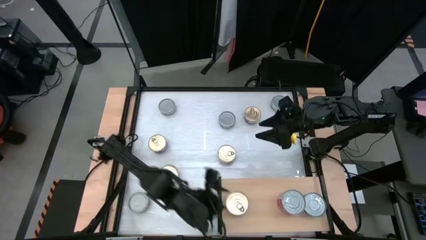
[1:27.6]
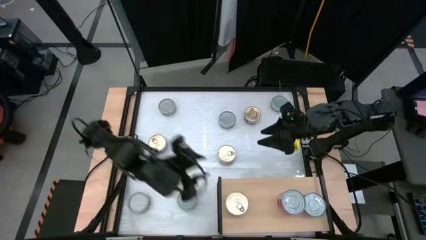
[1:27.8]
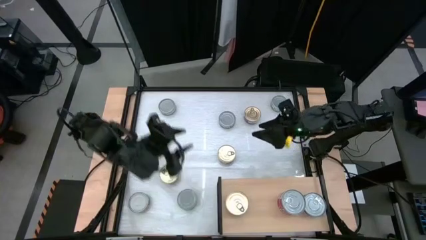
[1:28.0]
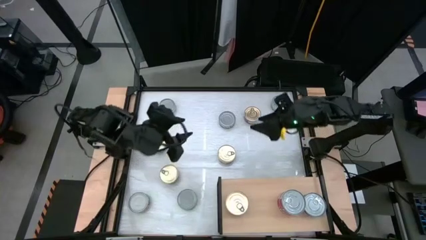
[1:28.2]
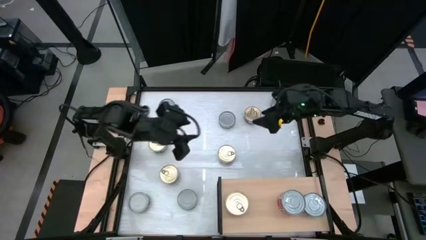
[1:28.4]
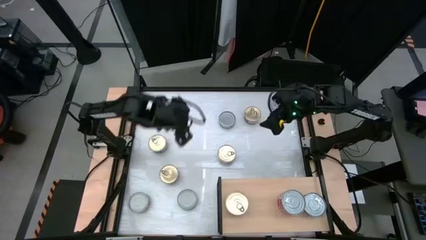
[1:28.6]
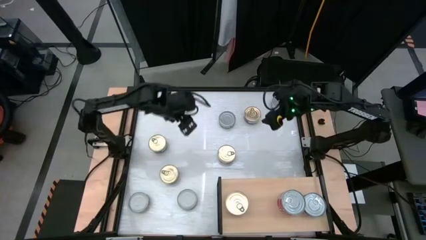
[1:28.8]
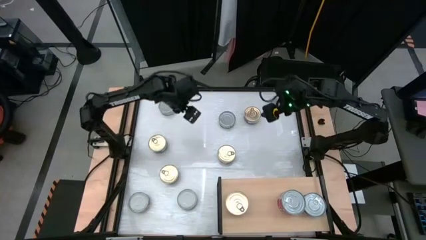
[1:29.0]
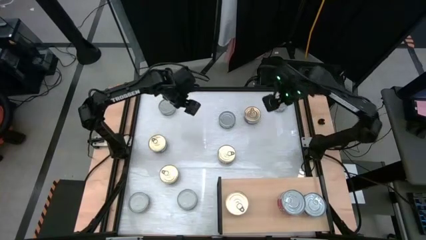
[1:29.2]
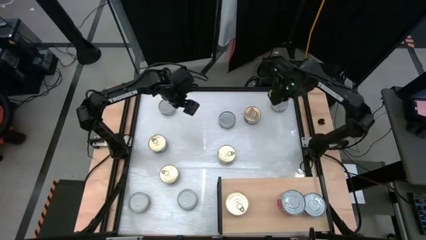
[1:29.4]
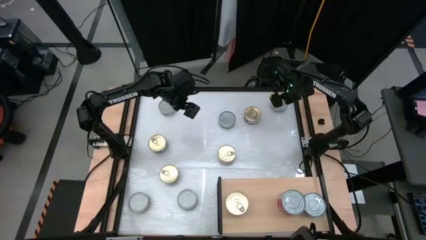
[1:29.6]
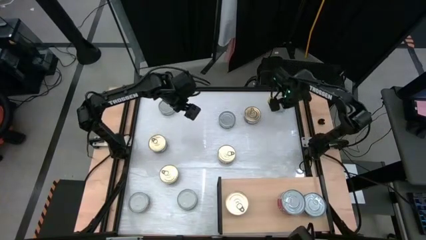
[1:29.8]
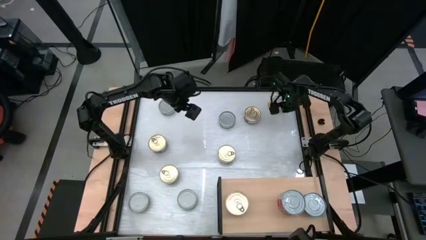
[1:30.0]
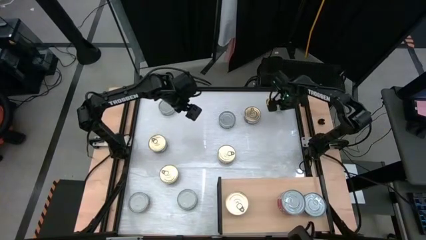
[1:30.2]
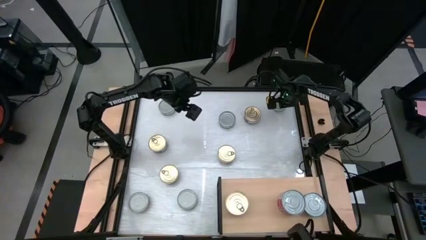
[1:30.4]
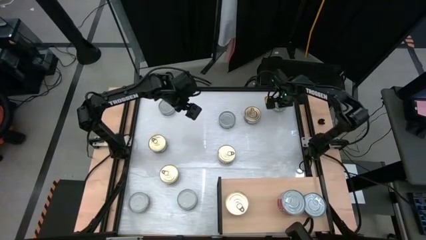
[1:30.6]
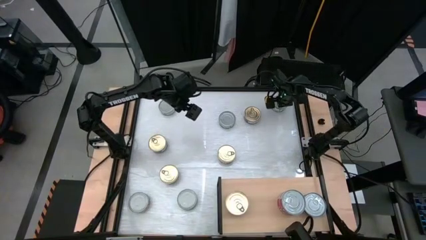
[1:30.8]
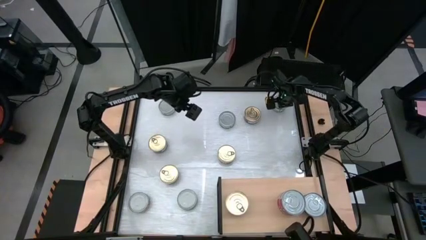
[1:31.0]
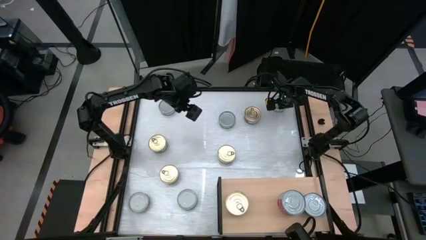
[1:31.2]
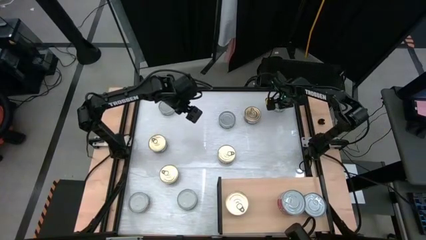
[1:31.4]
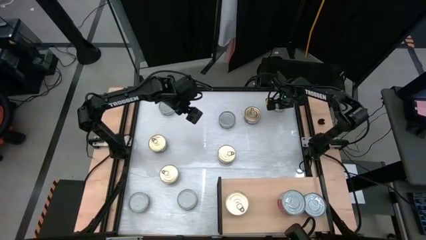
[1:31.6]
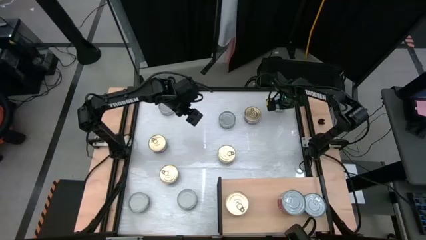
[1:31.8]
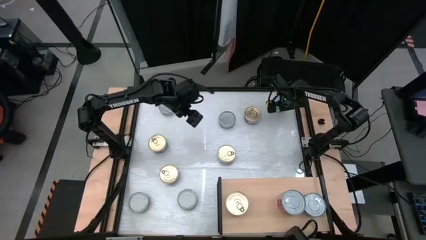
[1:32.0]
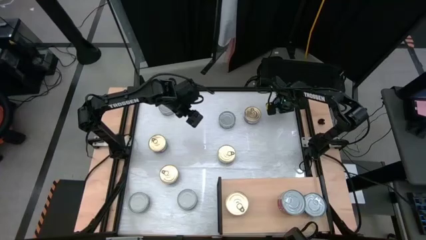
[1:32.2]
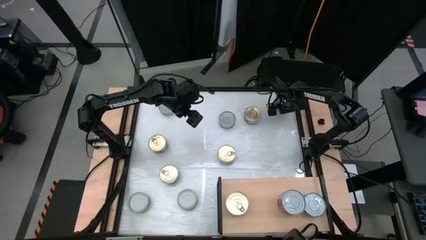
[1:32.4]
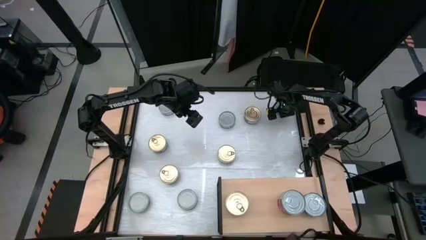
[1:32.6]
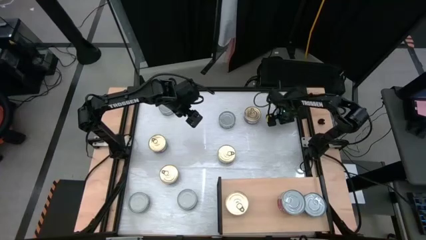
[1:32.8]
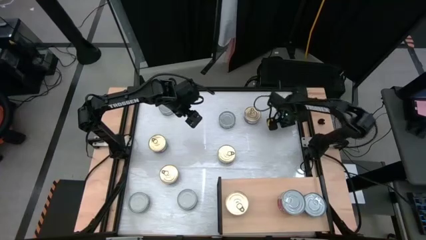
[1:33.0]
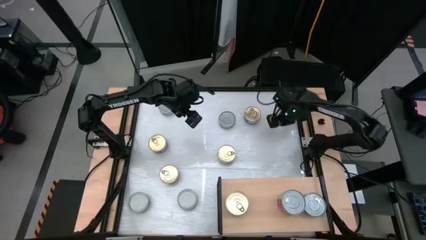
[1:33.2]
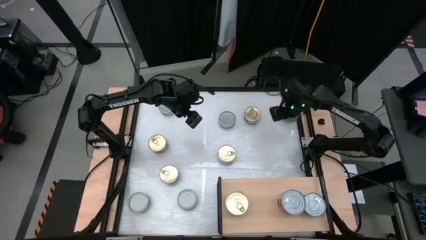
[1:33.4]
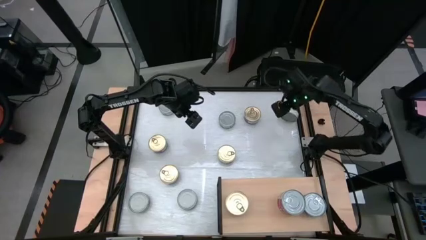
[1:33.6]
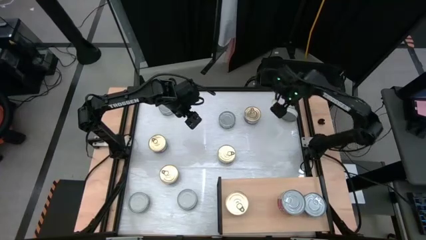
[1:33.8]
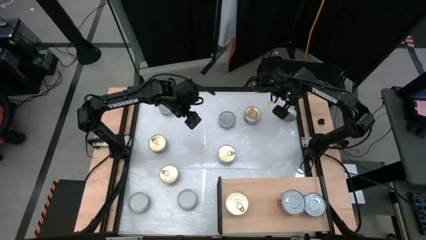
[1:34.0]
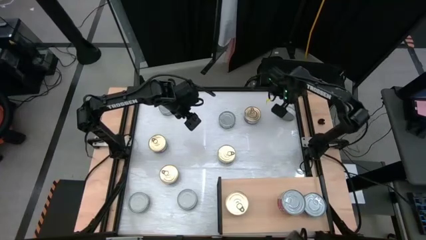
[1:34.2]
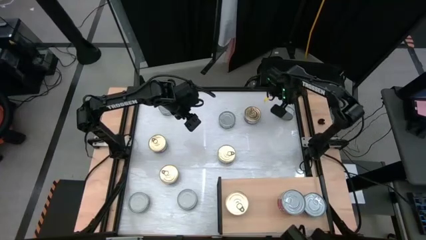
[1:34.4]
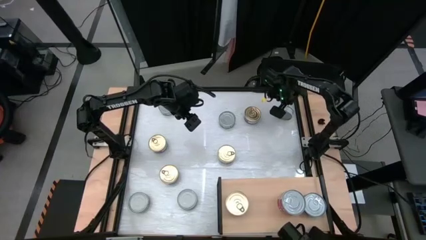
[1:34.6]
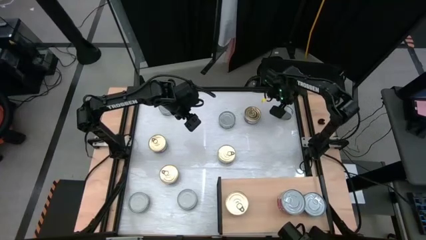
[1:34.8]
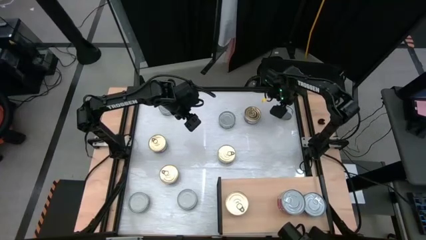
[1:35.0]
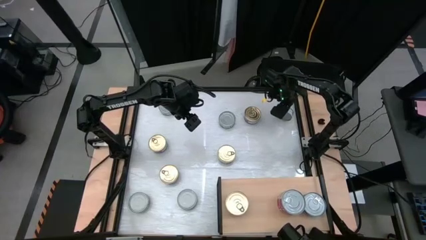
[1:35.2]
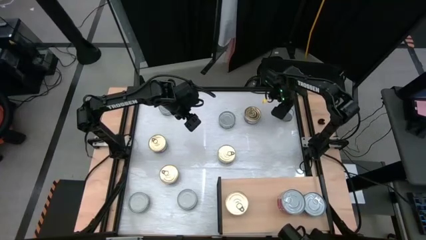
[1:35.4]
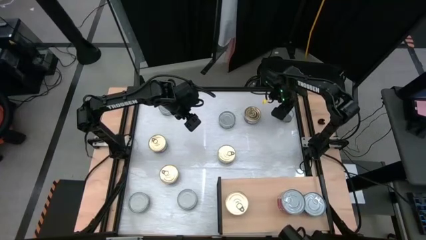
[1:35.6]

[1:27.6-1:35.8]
Task: Stack canned seafood by type on shelf
Put the green tuna can on the shelf

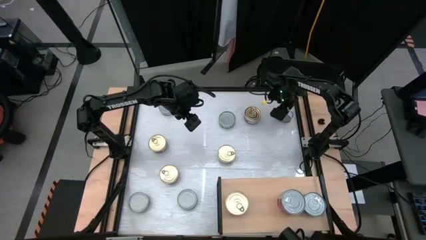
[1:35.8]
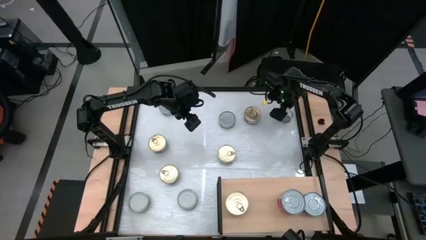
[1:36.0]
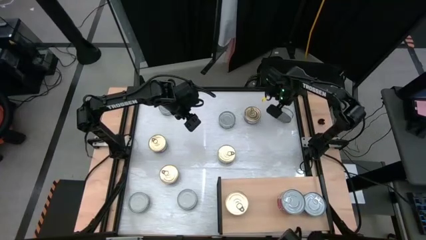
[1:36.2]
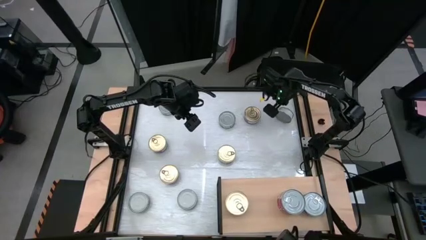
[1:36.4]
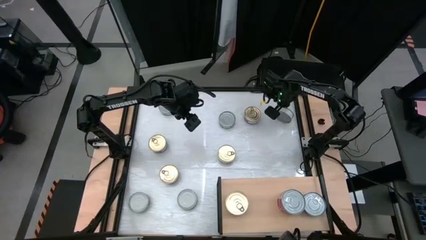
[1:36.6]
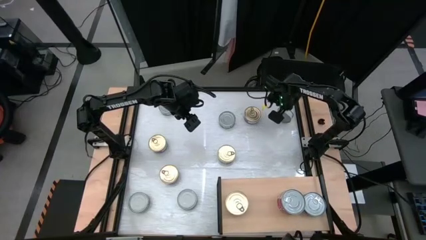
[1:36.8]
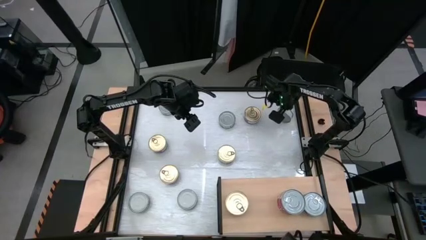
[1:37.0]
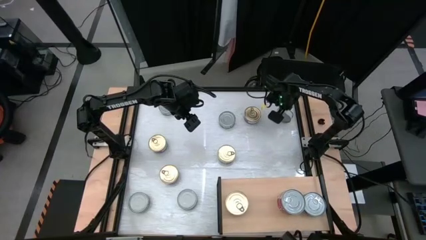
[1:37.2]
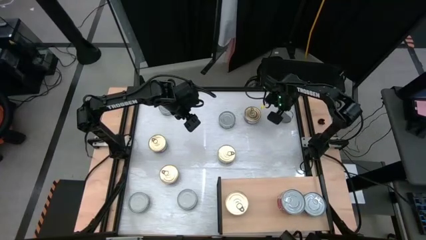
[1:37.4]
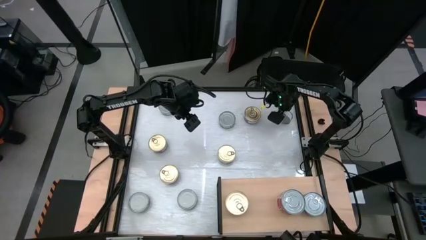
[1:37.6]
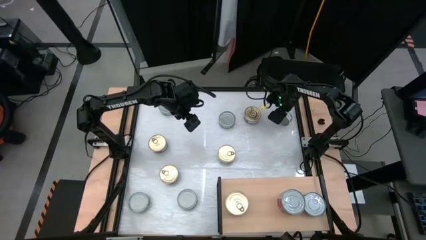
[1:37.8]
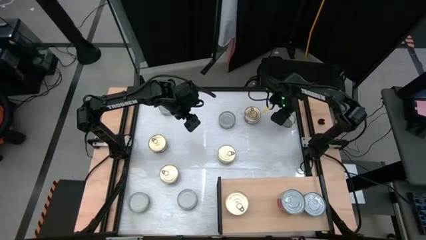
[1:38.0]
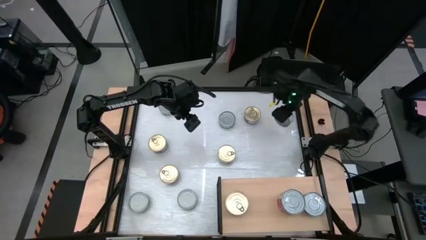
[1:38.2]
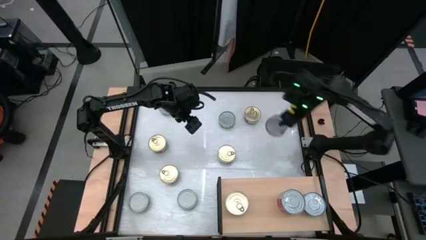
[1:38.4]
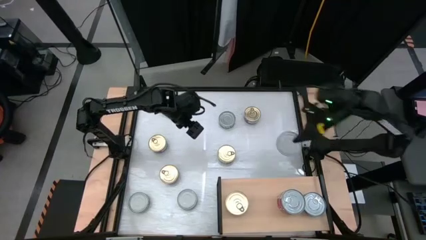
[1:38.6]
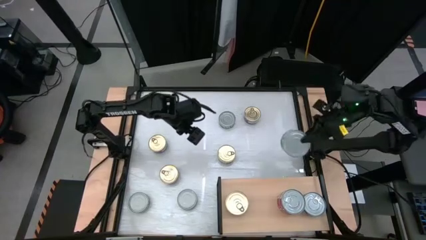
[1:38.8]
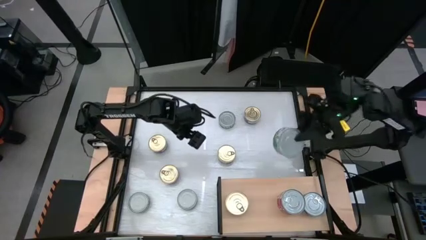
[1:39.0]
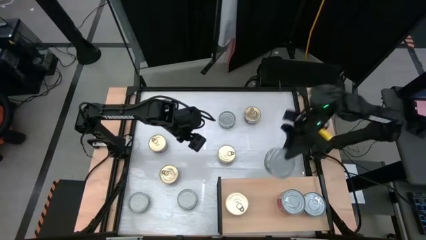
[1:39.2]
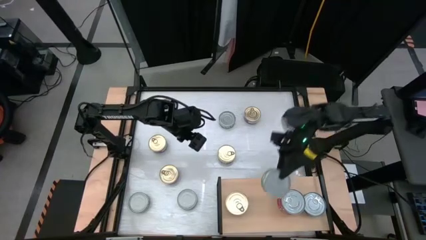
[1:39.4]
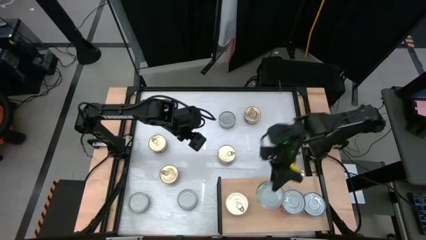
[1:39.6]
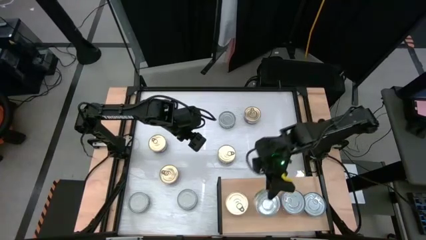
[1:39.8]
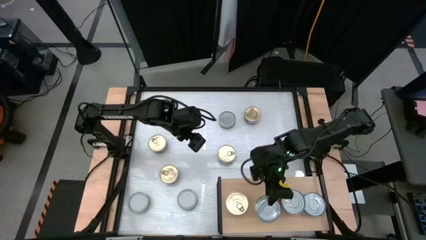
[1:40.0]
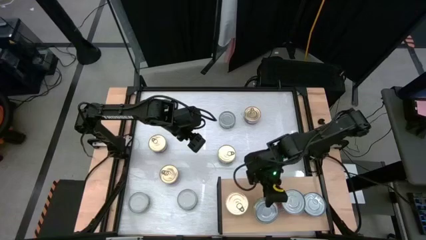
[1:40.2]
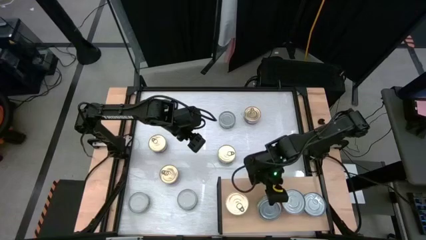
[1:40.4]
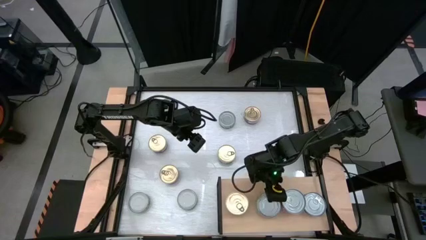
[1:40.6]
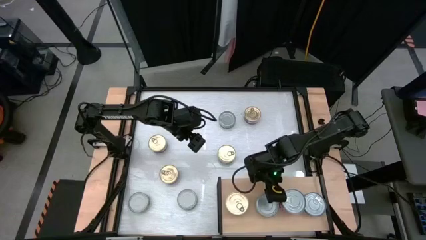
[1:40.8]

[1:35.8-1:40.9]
Put the green tuna can on the shelf

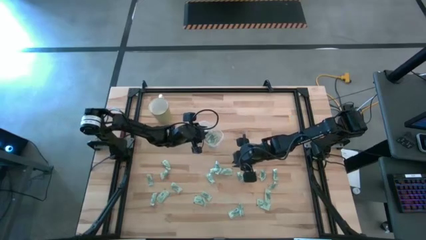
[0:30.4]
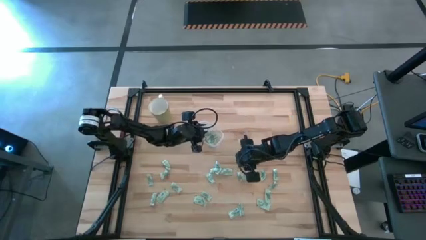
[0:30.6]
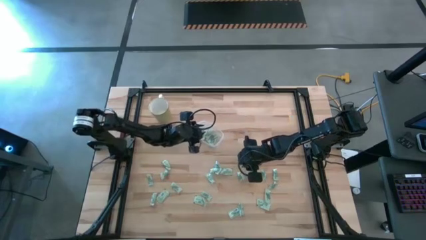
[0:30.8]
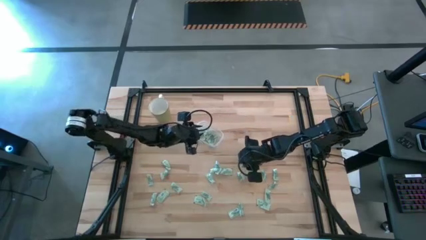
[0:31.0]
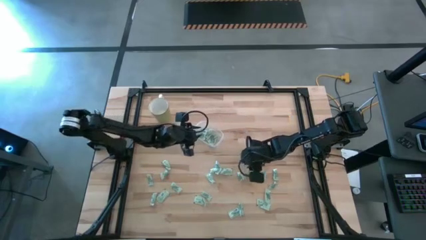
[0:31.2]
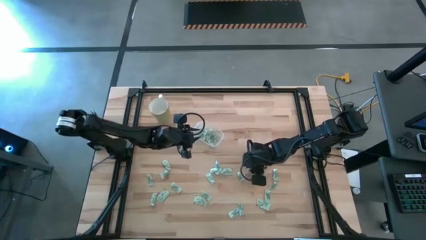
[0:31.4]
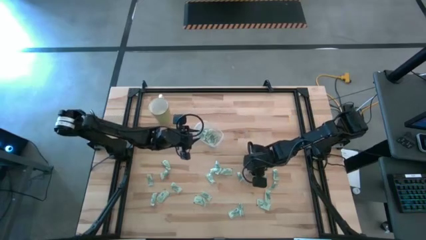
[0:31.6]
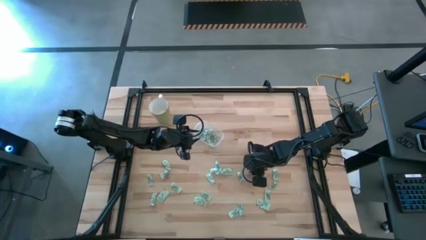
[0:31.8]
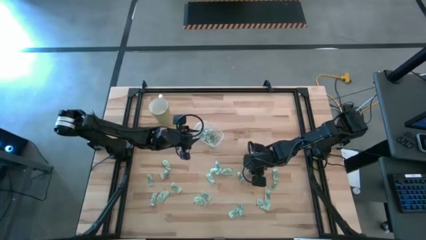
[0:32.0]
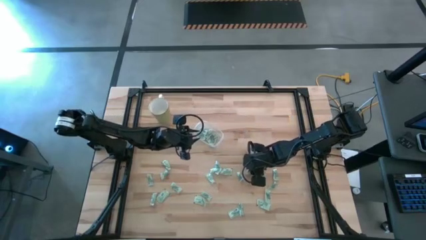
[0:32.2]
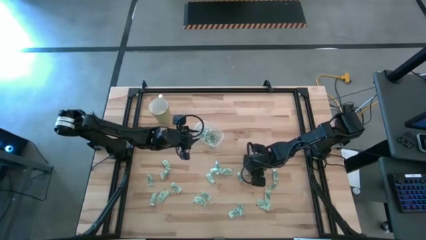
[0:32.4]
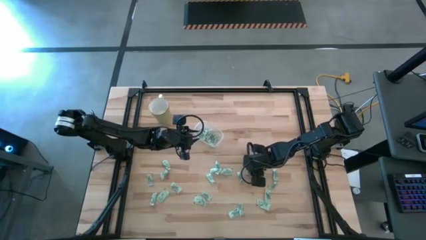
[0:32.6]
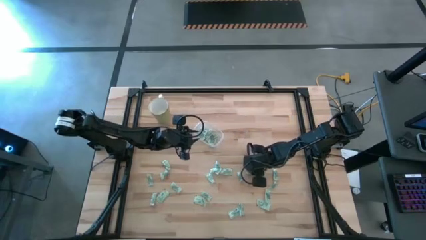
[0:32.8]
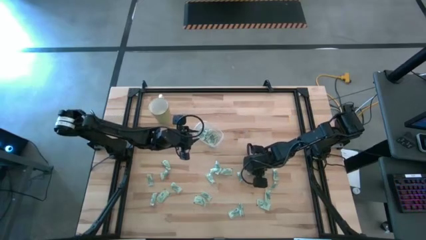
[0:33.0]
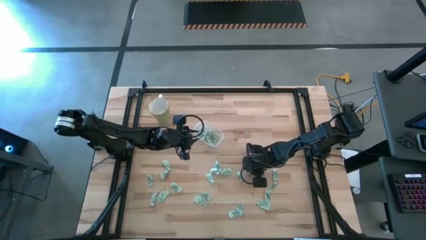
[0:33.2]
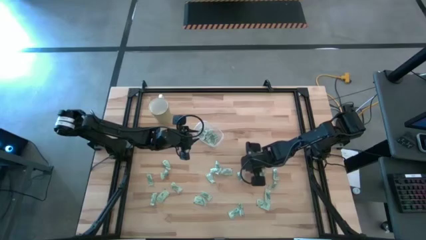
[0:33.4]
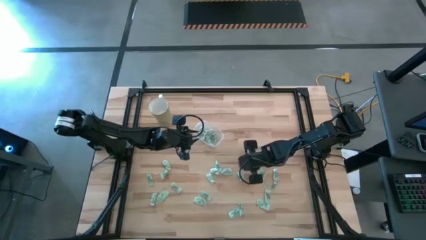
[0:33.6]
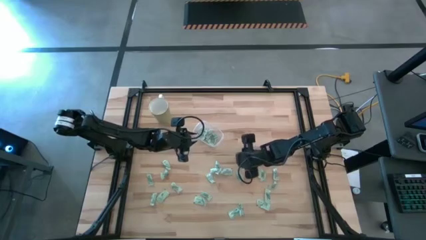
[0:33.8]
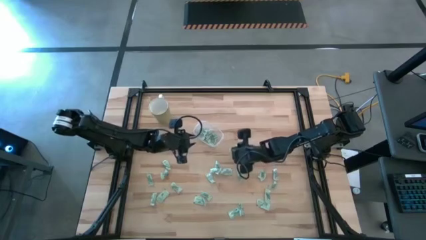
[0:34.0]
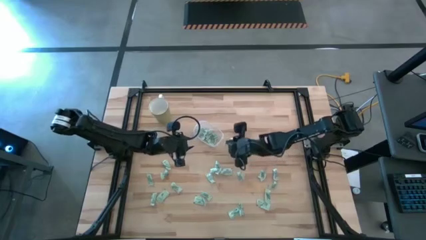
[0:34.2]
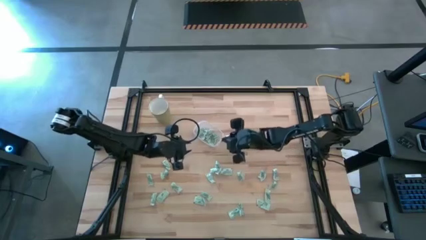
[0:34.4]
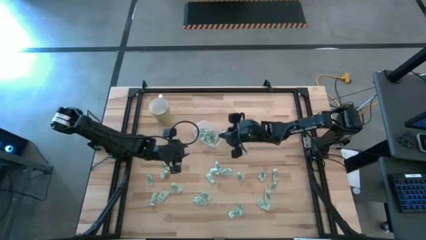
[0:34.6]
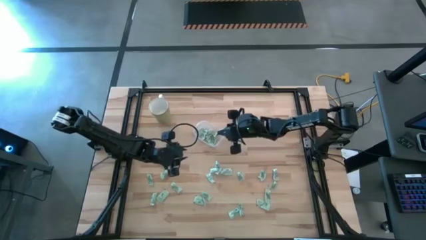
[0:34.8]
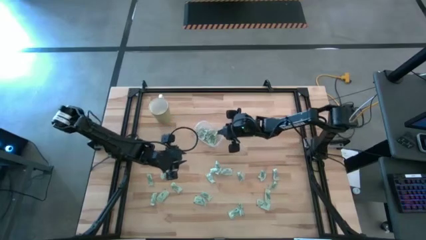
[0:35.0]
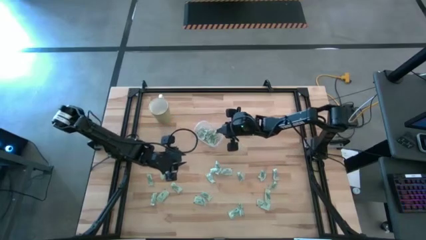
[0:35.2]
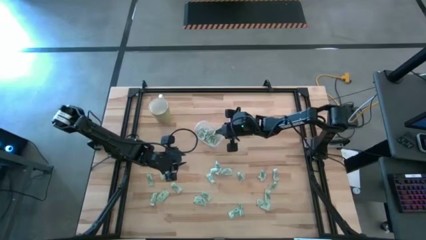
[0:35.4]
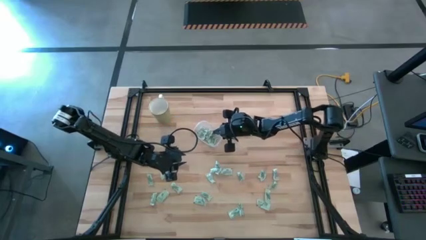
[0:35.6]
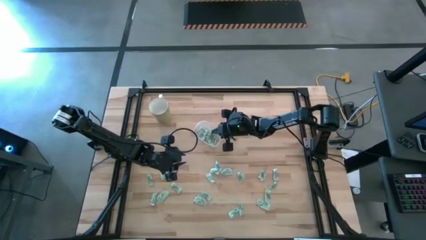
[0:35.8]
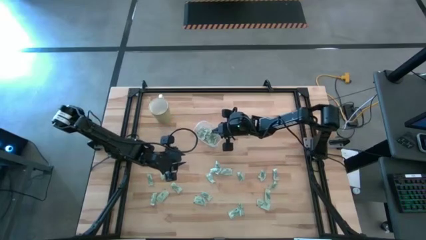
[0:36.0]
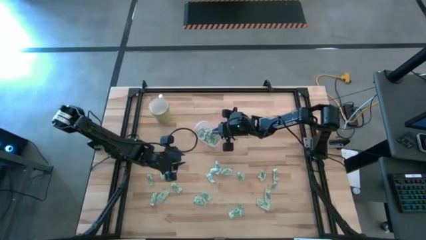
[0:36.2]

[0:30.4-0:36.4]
Task: Pick and place Stevia / Truvia into bins
Put the stevia packet into the transparent container
